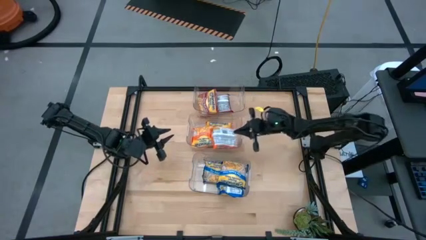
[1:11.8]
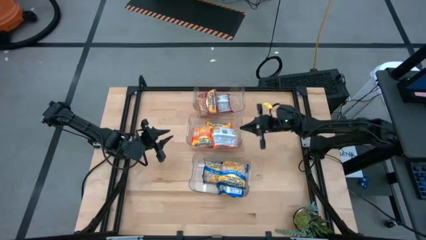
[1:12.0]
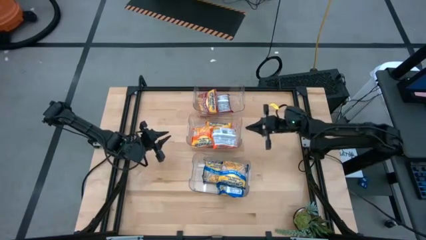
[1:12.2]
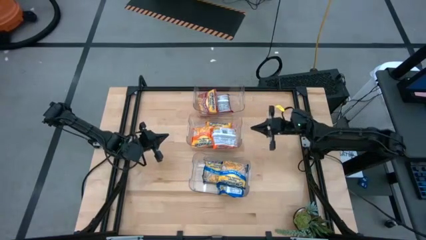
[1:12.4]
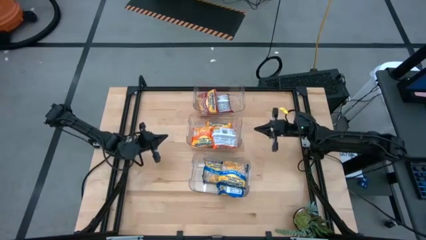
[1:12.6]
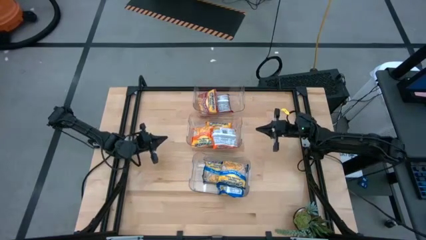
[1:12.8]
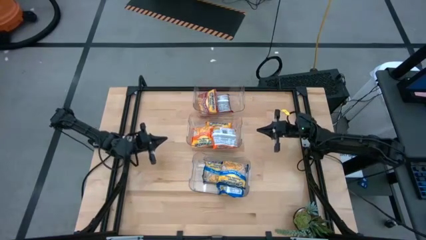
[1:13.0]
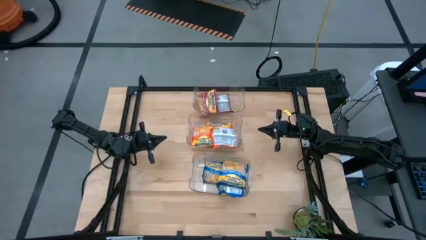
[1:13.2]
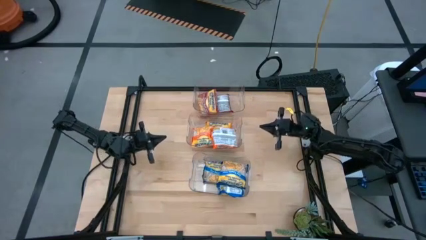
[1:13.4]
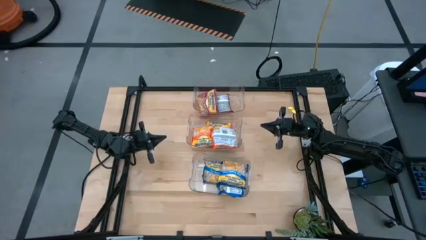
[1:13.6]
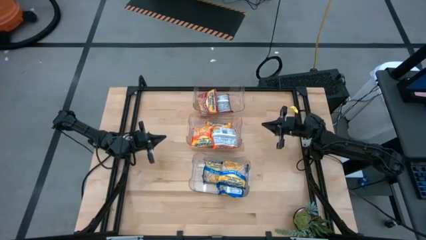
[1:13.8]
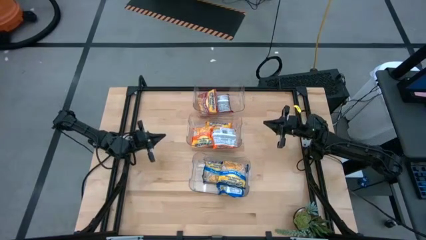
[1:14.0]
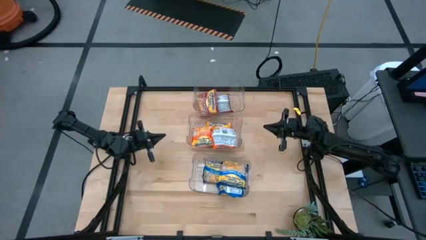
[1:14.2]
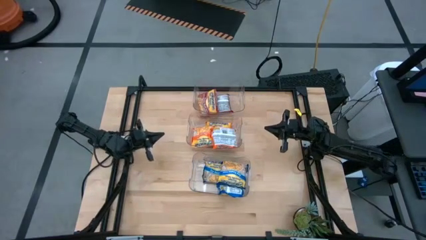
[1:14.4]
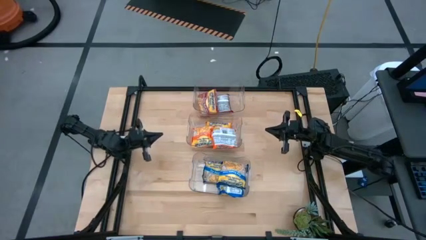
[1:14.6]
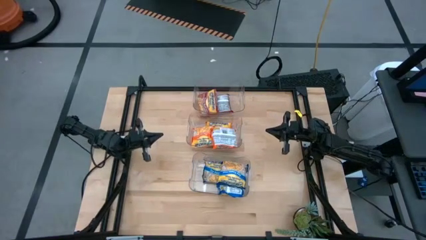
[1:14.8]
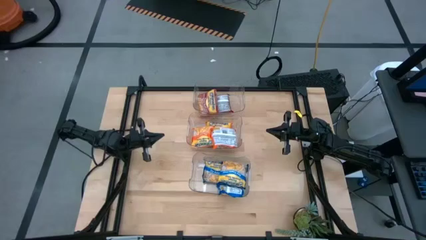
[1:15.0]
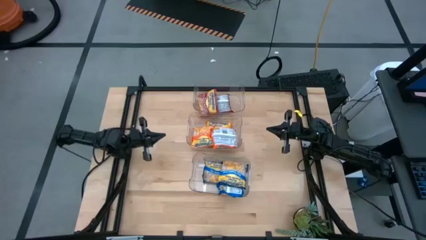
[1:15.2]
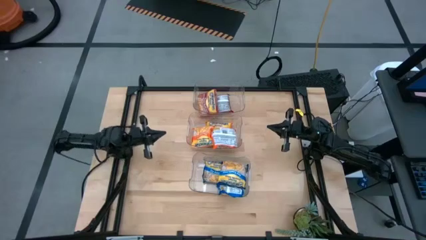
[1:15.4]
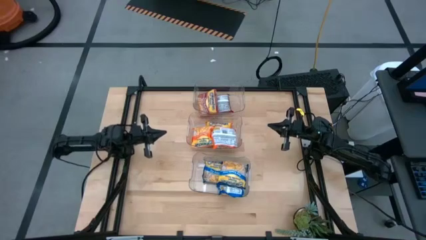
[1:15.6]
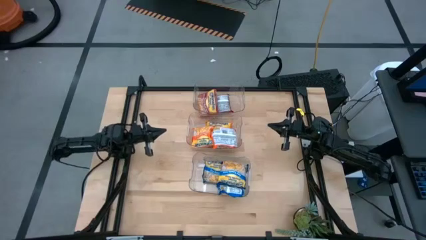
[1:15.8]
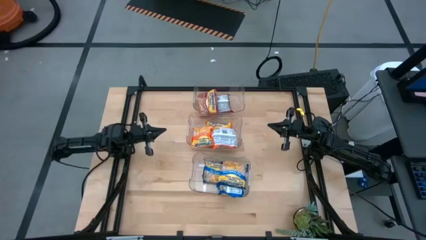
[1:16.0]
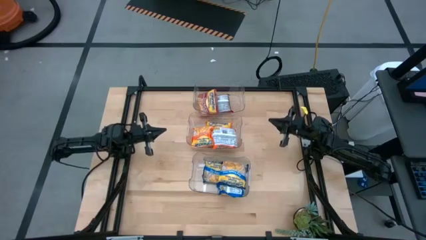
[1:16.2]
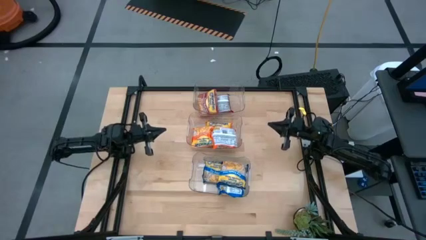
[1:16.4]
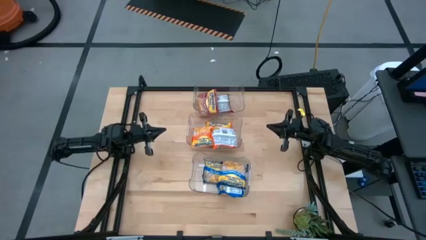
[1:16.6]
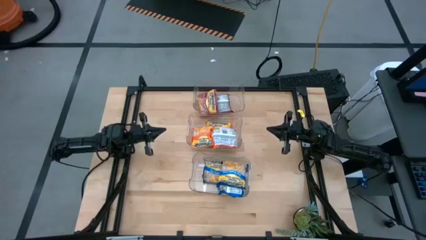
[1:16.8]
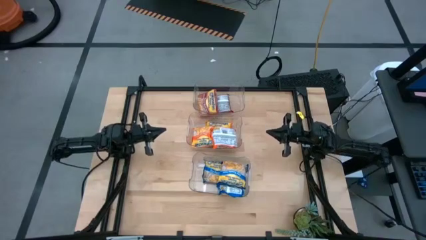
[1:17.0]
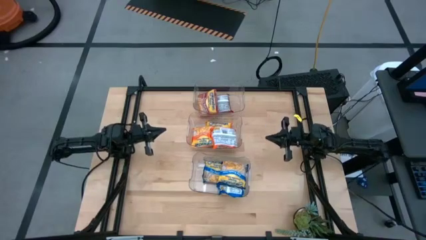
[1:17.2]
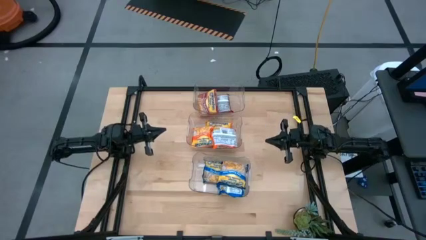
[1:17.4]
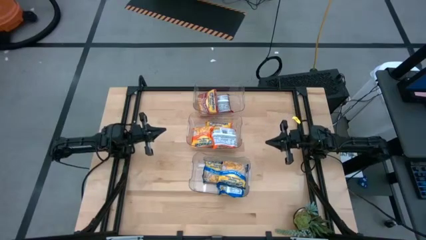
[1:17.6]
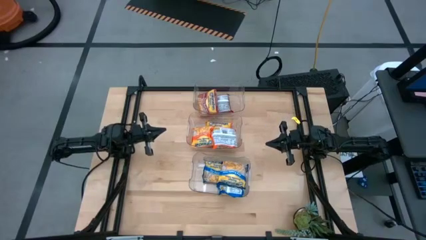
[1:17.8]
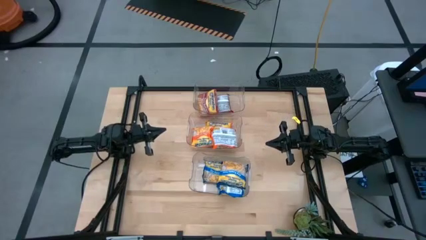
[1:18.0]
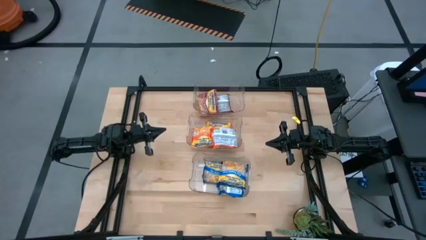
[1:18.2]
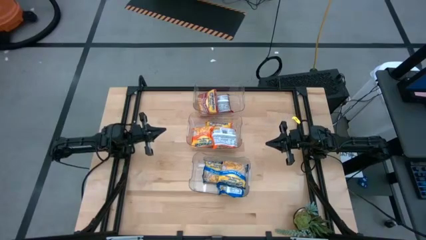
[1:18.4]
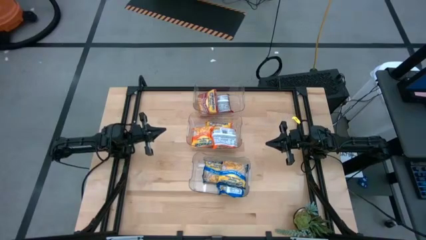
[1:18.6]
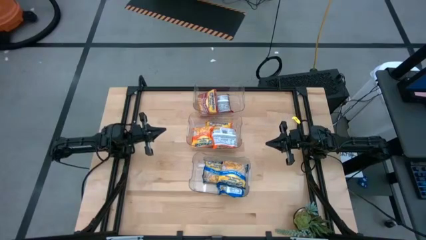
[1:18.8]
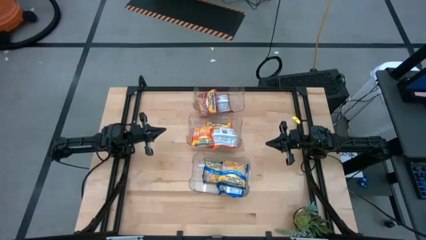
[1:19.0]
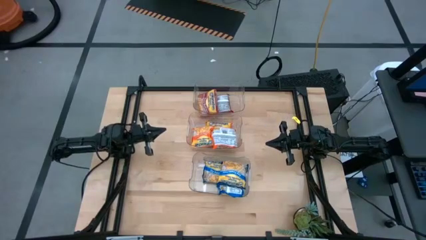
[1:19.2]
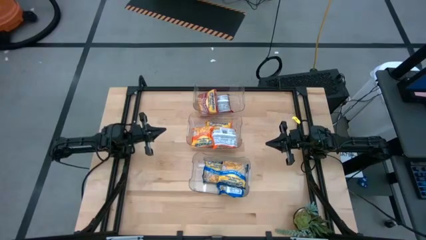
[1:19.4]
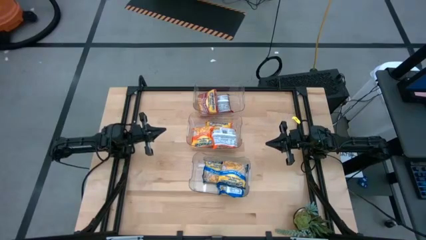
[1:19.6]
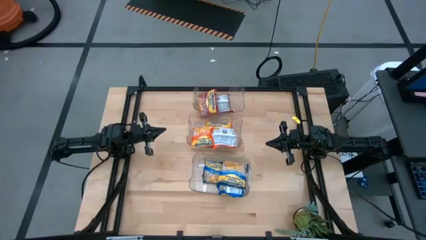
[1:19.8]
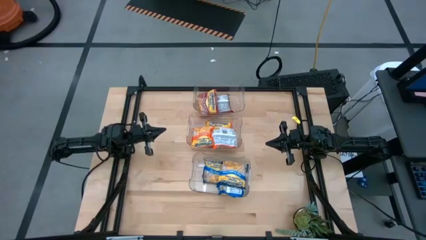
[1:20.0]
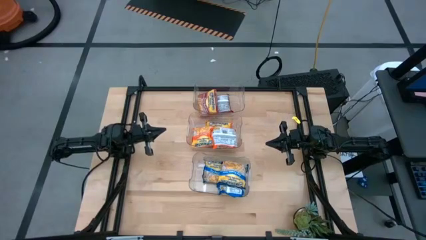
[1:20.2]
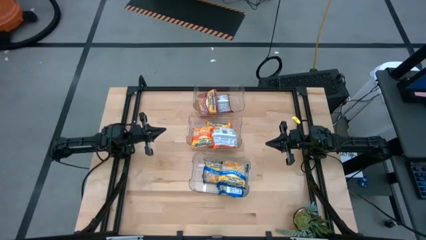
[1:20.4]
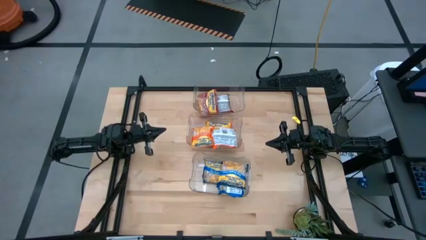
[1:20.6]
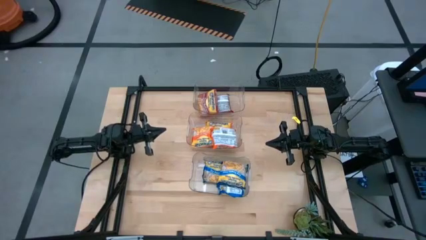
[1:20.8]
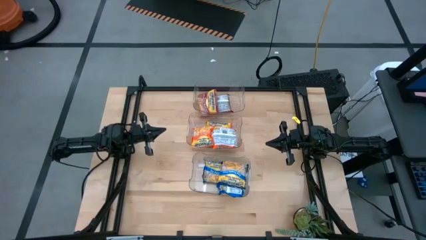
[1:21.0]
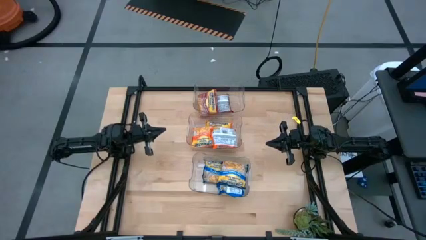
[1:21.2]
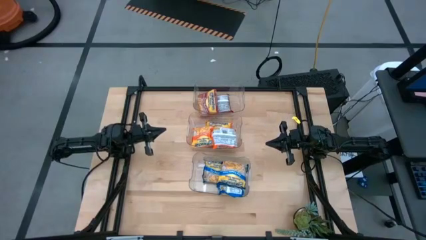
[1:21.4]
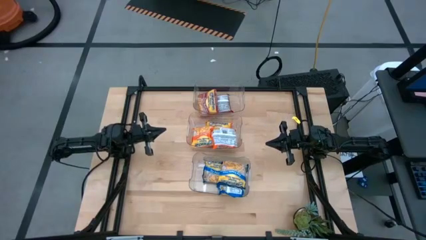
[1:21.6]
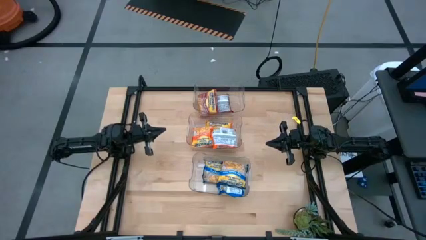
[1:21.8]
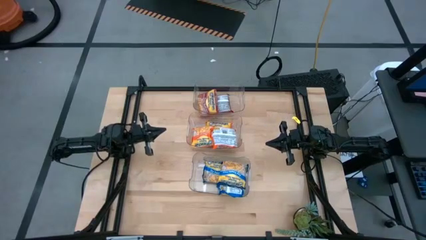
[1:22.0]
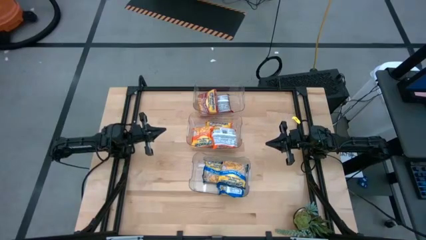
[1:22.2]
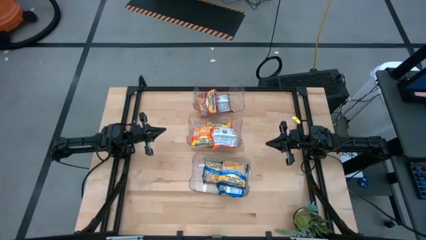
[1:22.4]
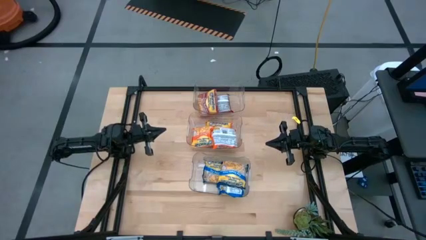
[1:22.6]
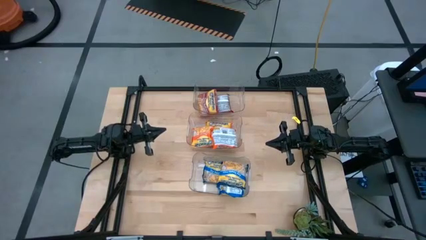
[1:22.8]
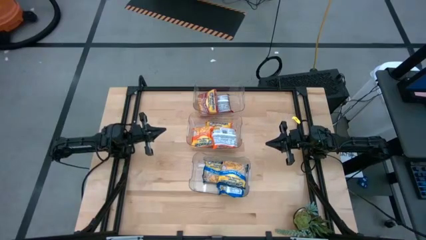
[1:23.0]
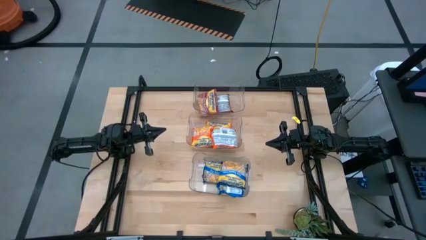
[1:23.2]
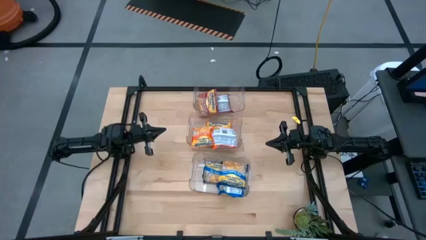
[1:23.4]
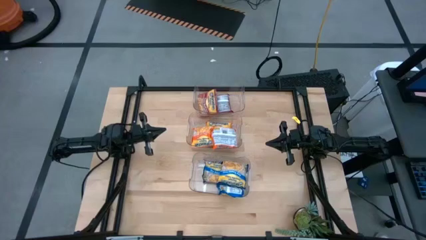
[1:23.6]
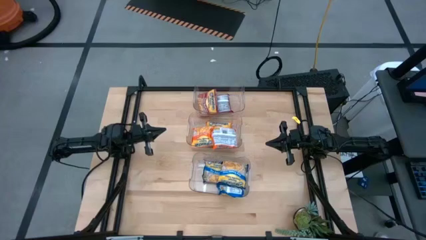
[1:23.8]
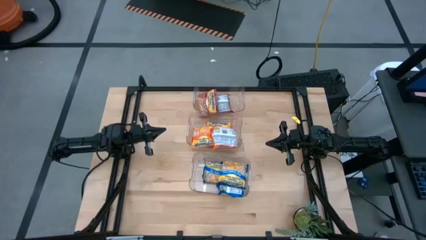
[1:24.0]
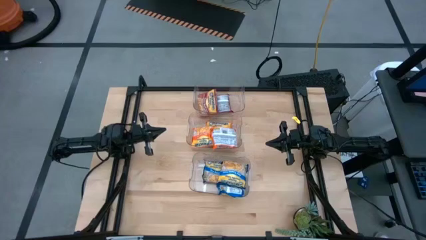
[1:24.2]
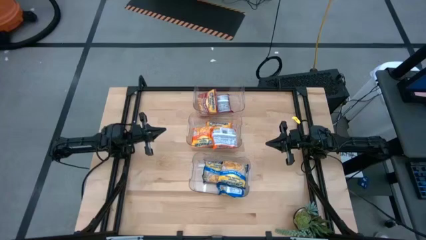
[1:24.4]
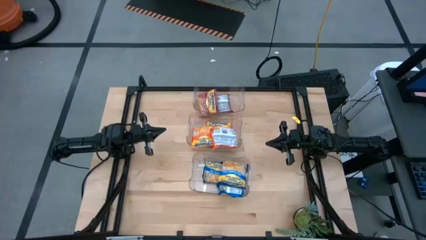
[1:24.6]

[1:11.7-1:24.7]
Task: Sort Maruchan noodles
Return to Home Position

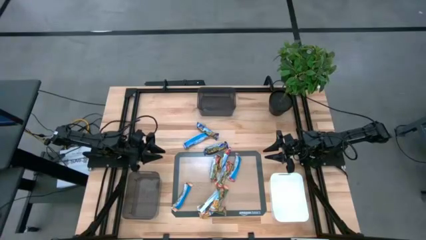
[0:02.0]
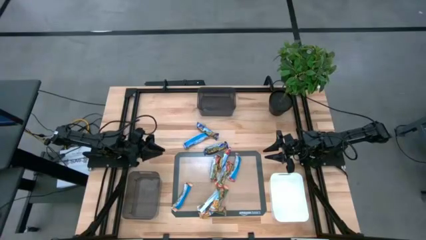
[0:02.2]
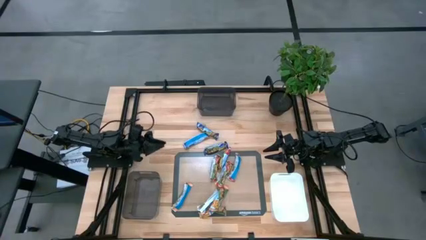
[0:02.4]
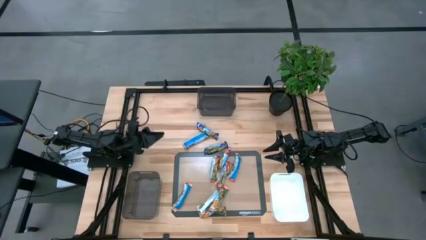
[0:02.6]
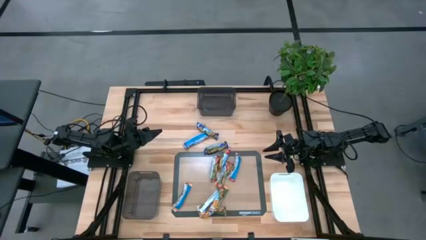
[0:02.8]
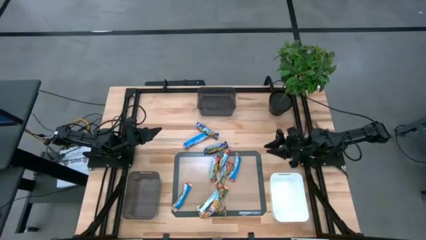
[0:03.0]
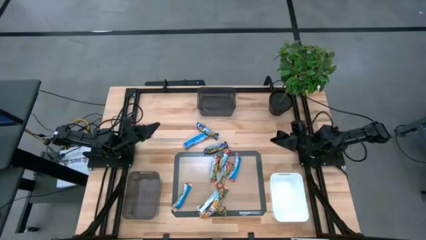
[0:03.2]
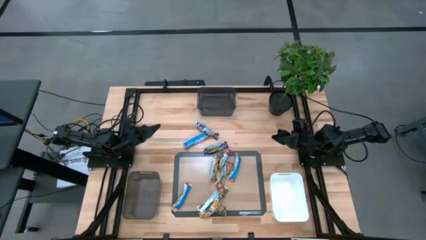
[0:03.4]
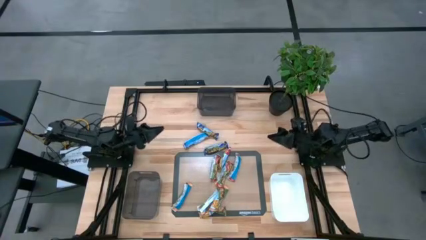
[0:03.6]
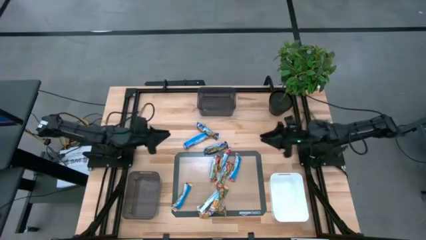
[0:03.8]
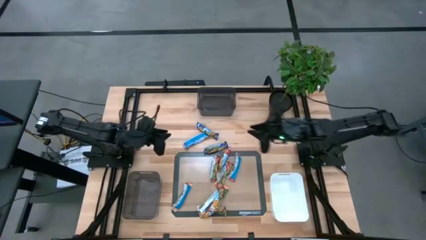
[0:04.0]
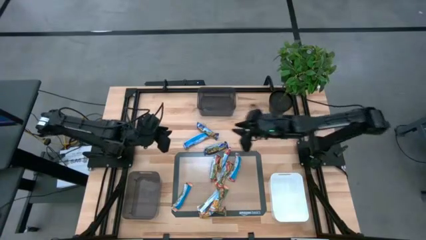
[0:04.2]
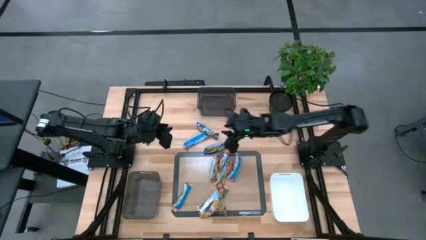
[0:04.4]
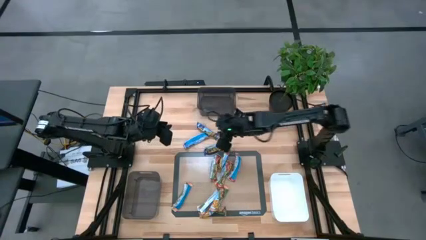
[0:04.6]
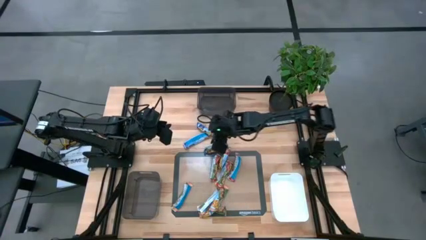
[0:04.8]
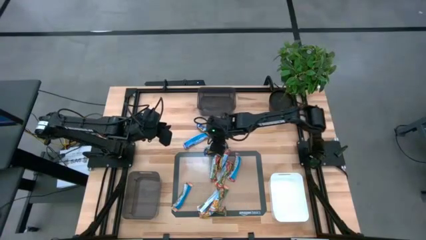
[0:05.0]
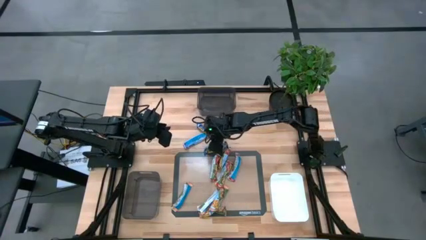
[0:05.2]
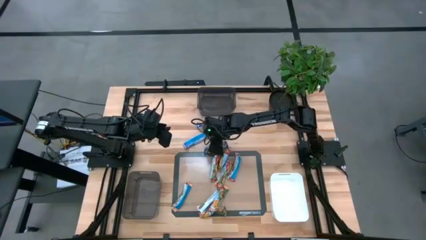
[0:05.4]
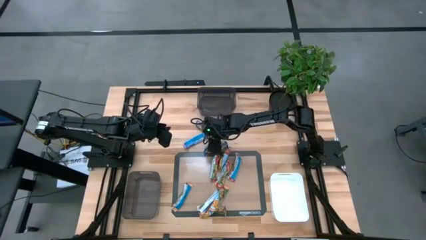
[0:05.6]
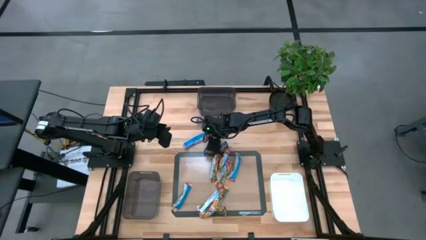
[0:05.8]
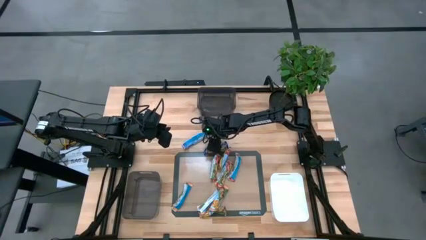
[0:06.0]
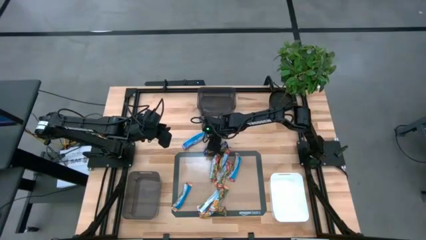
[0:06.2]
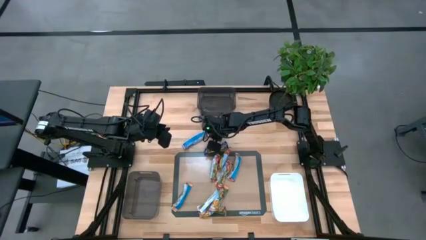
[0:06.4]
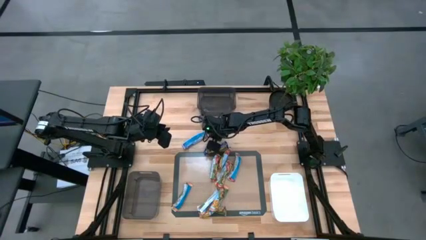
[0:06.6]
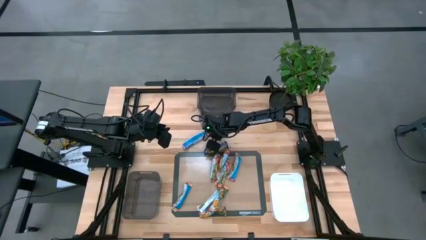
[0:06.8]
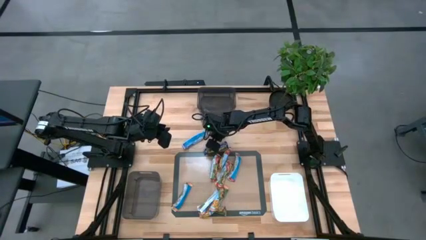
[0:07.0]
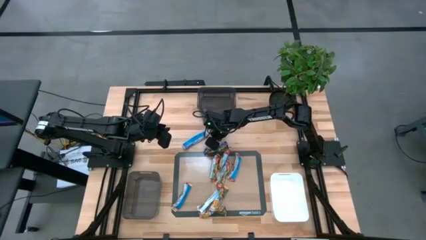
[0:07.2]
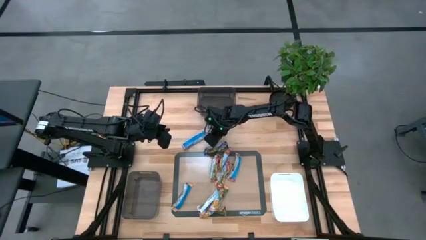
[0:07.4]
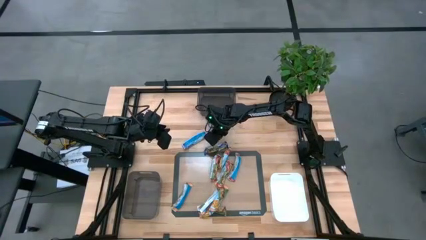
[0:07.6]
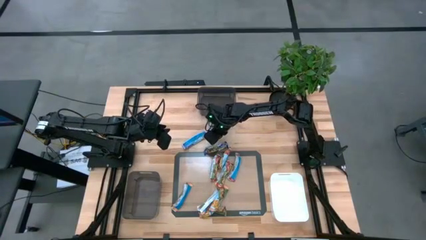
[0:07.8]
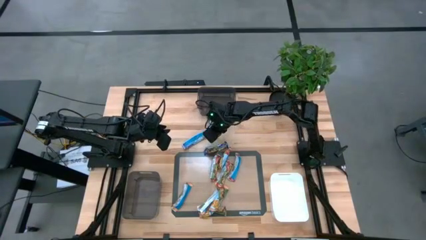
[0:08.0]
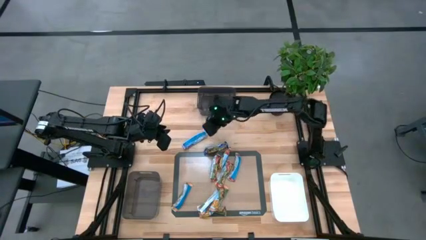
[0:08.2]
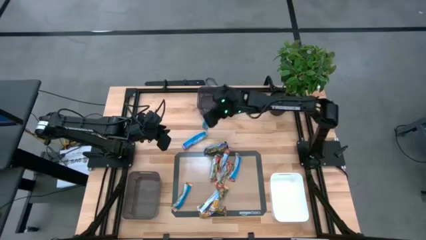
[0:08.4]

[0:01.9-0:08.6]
Task: Pick and place Granola Bars by type
Put the blue granola bar into the top black bin
